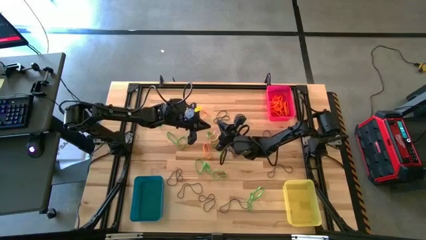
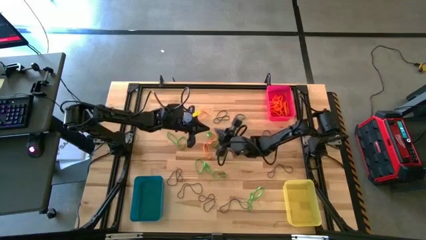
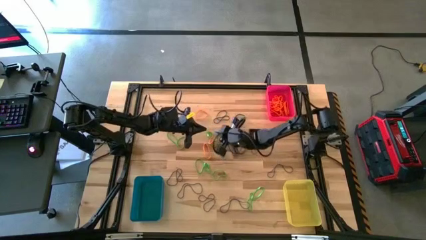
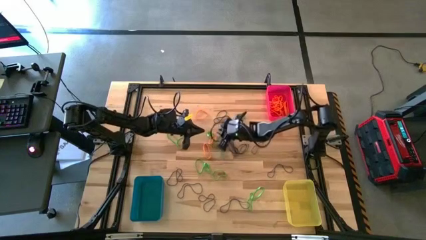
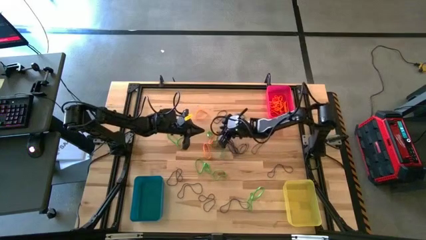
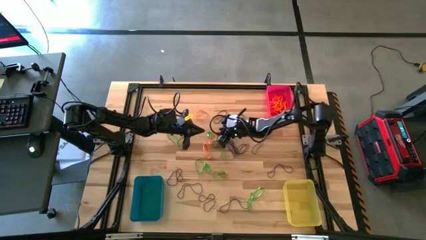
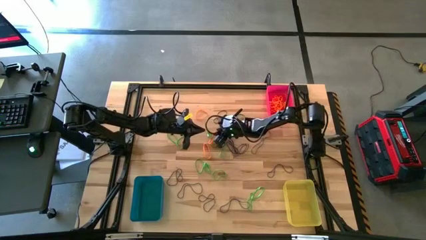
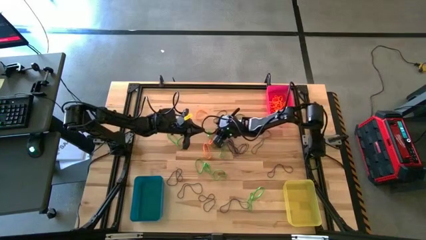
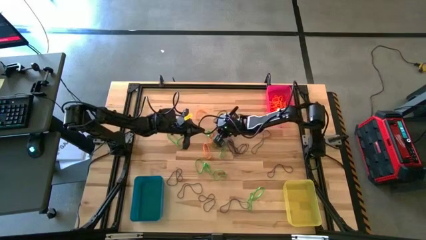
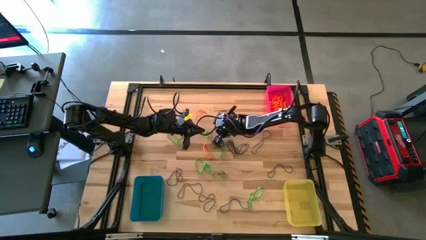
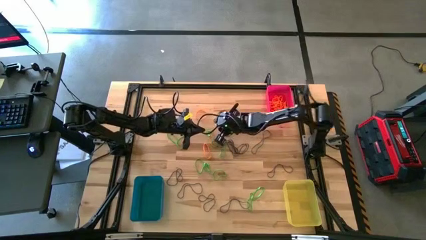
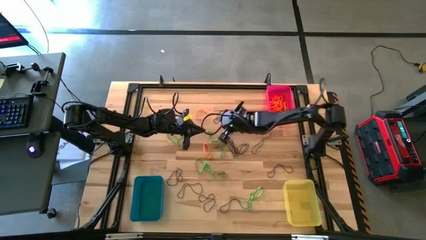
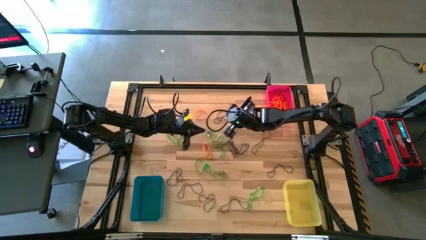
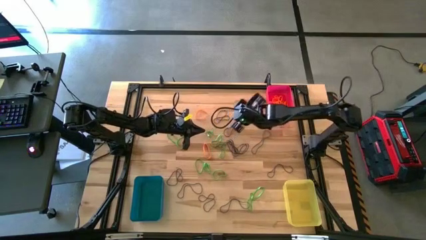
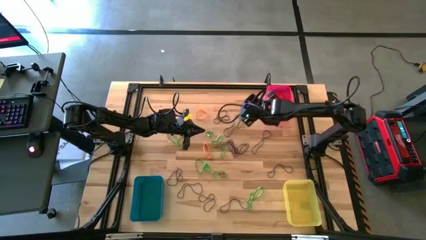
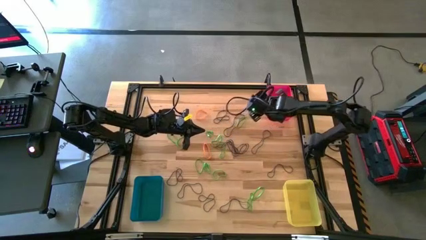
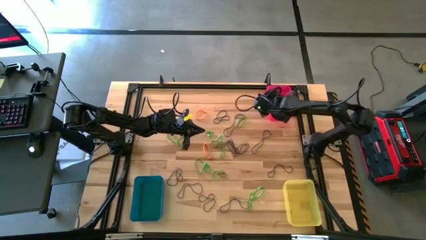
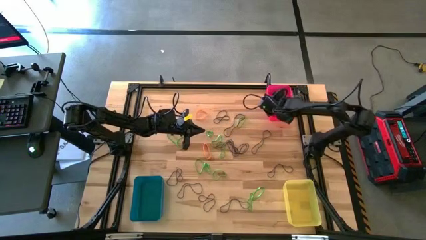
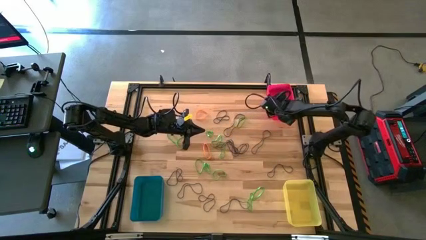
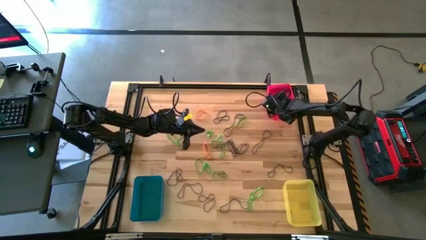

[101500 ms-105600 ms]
Task: Sort rubber bands into baskets
Put the orange rubber band into the red bin

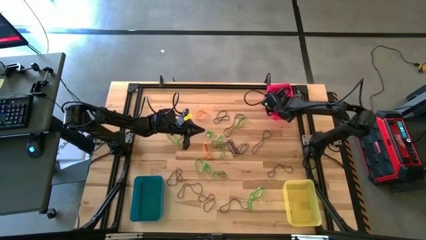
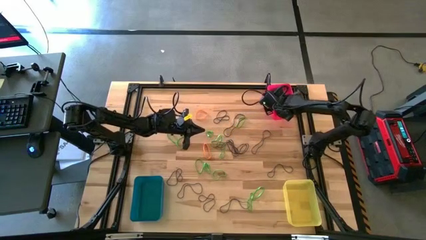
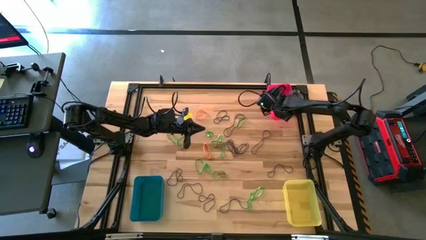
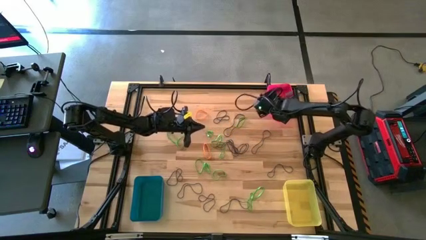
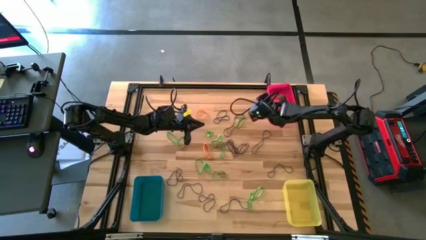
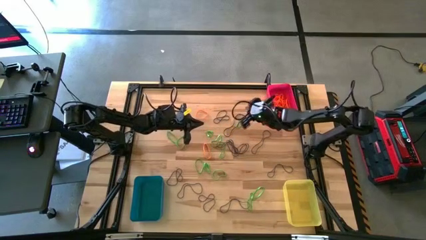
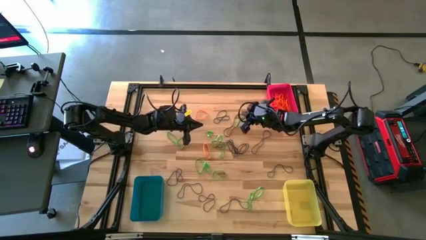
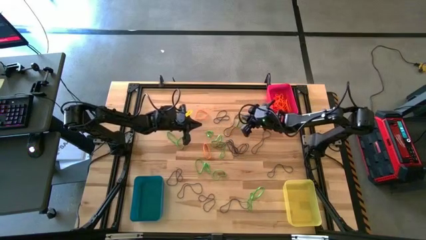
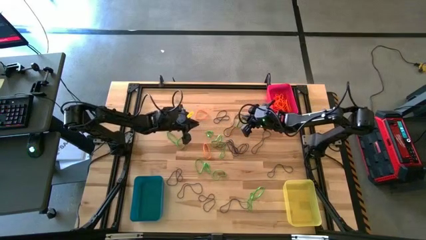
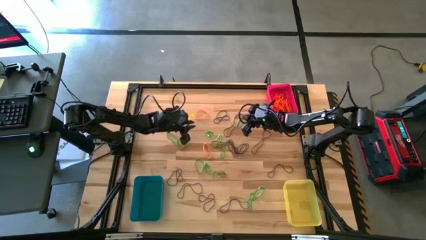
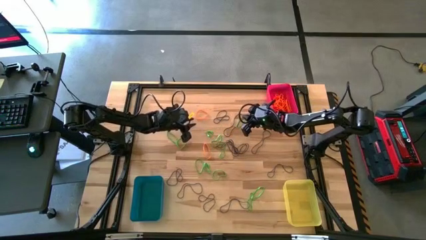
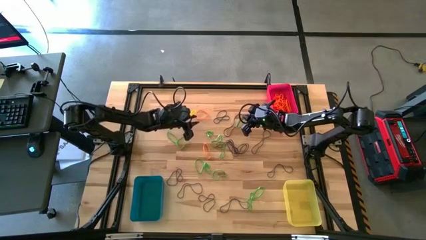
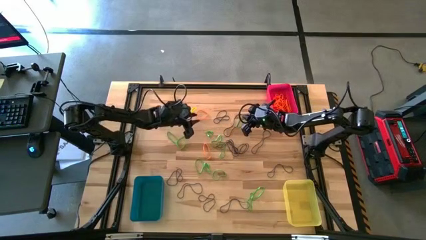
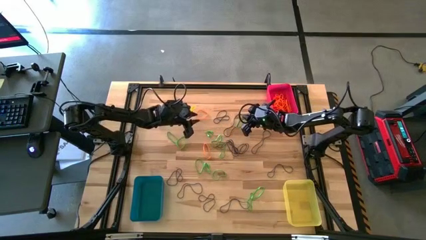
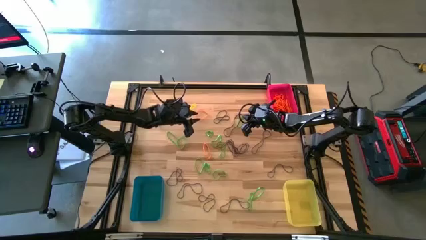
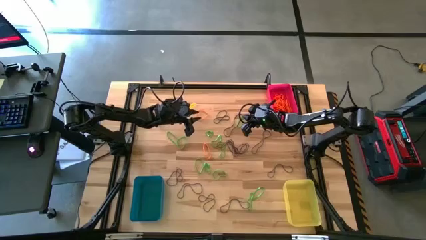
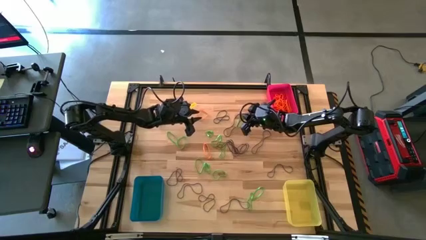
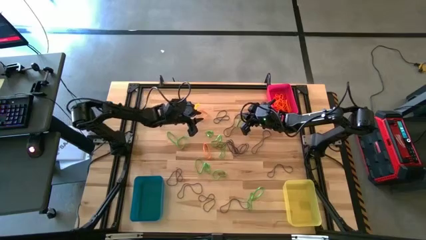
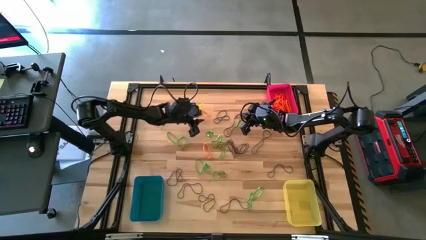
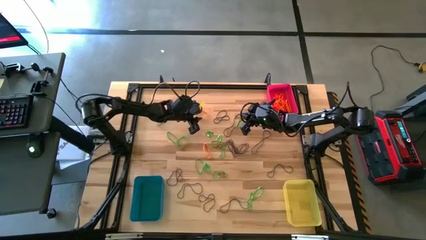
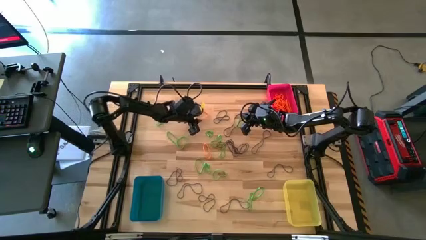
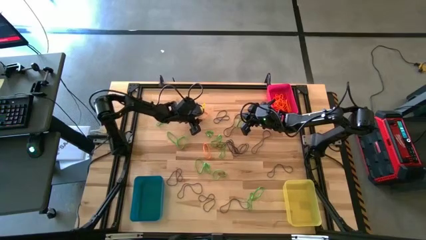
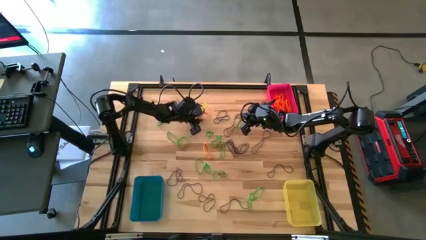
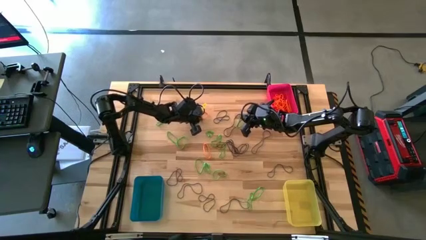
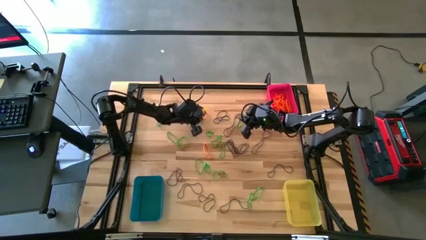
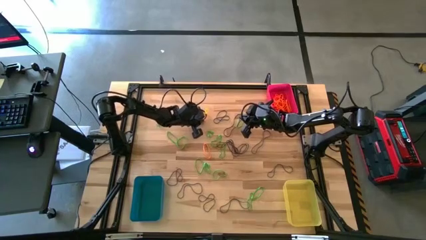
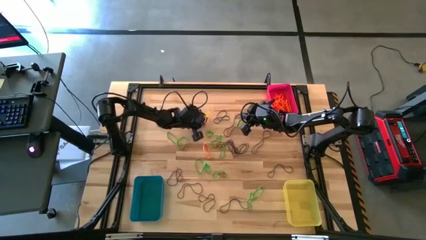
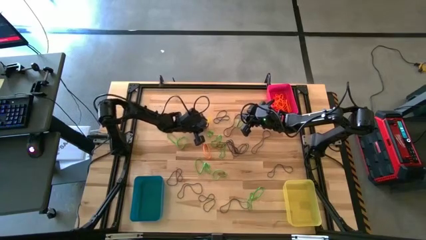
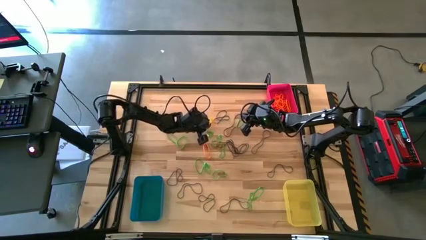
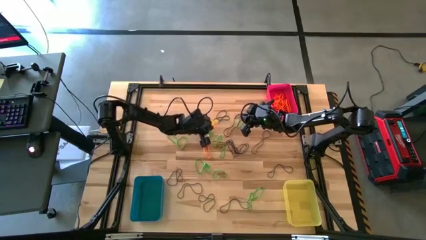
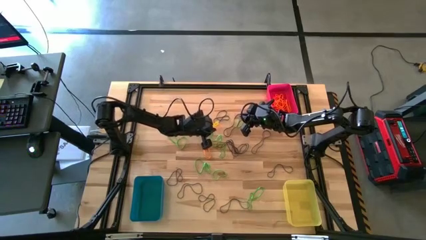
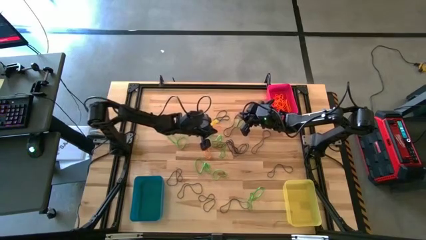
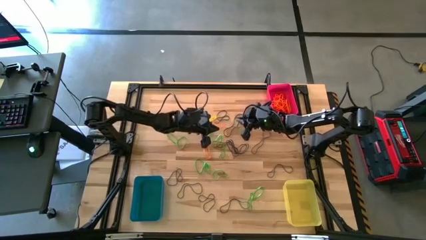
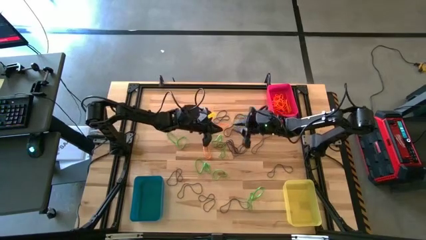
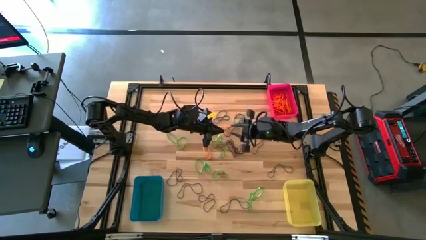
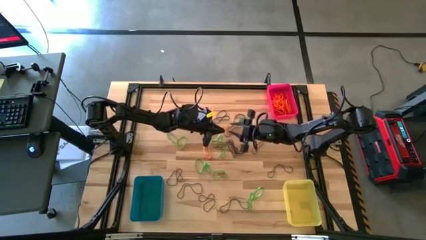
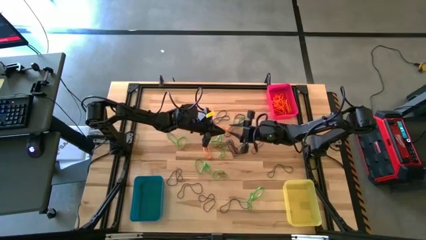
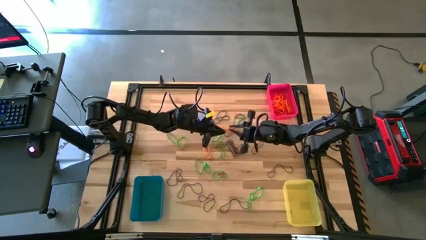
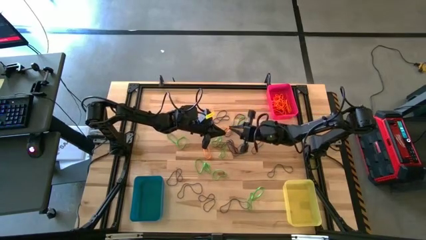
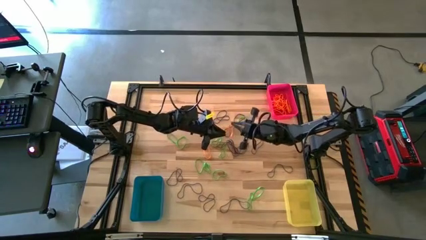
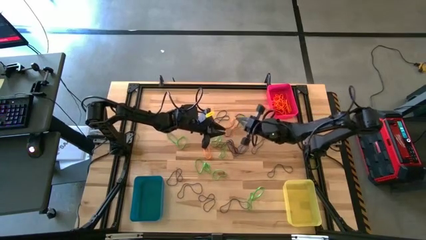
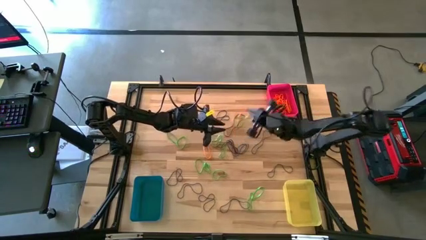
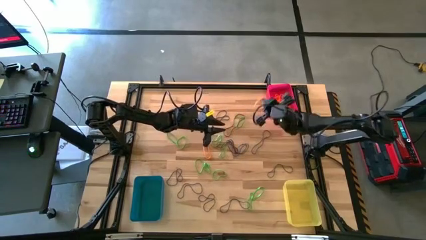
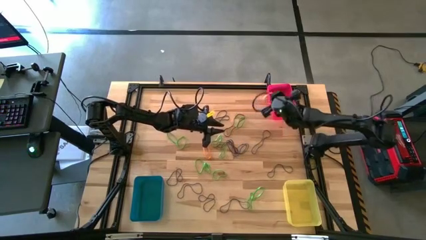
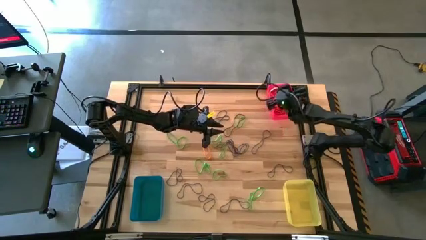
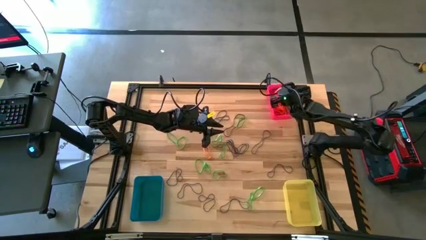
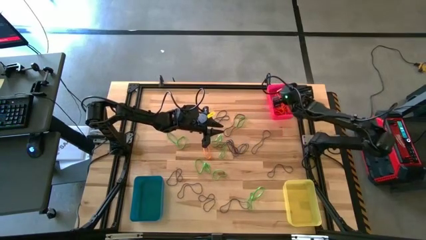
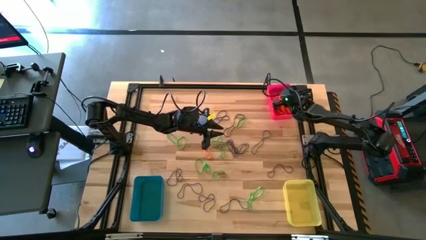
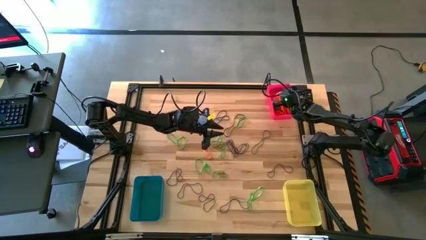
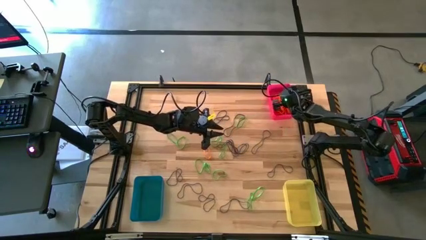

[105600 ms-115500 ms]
Put the orange rubber band into the red bin

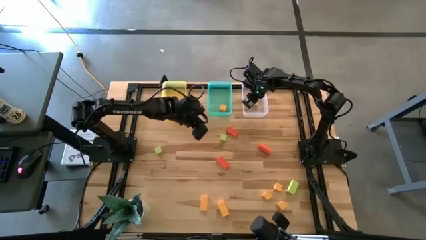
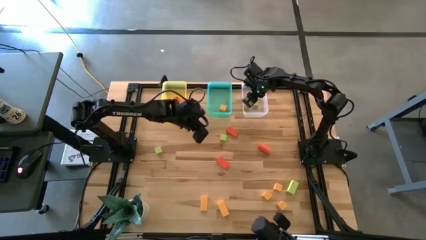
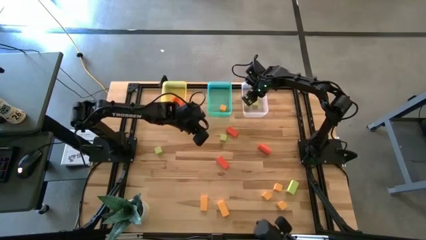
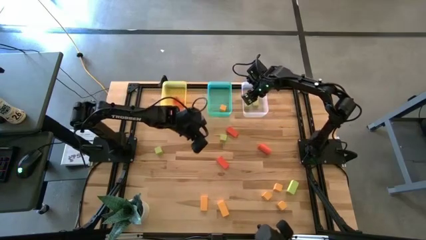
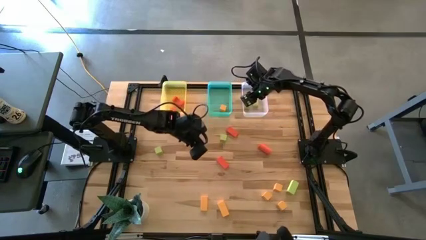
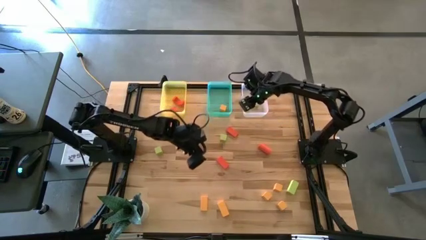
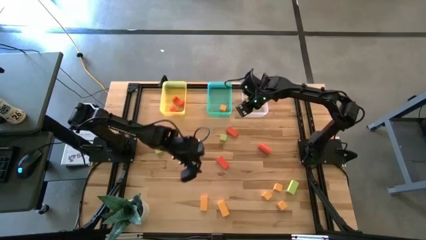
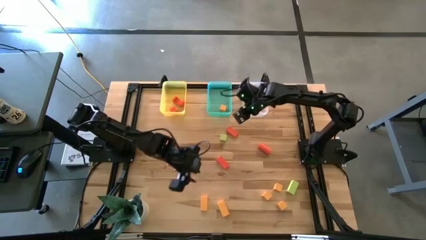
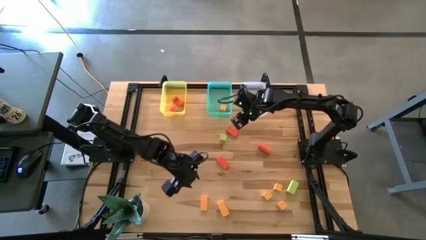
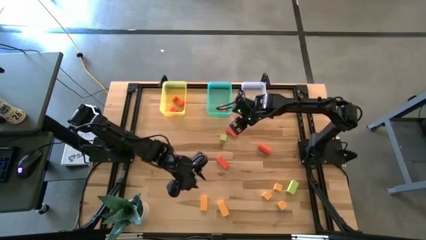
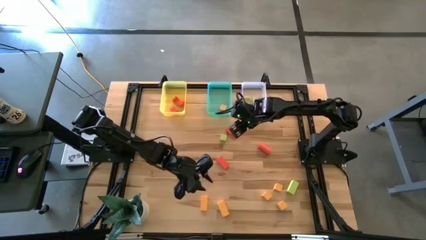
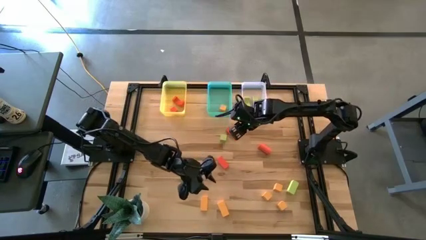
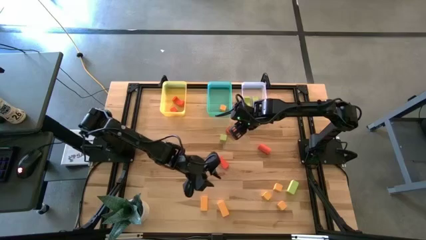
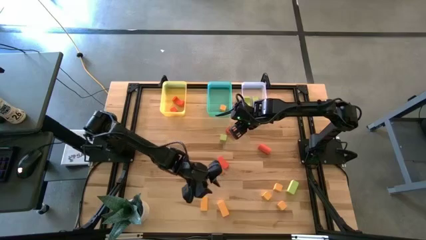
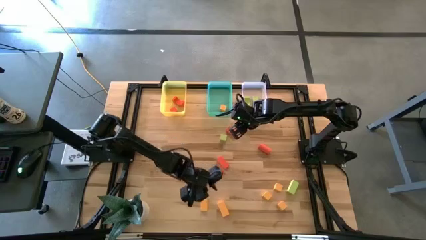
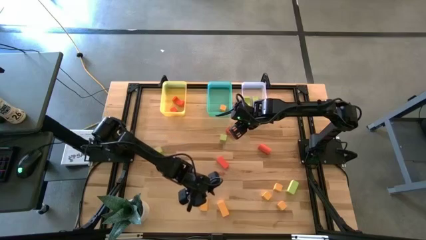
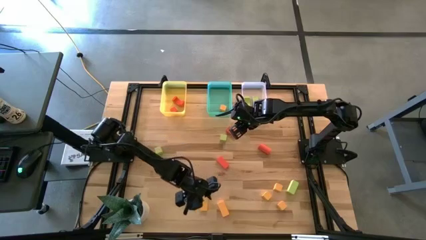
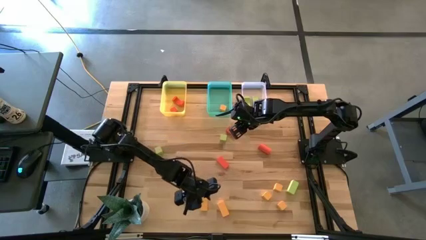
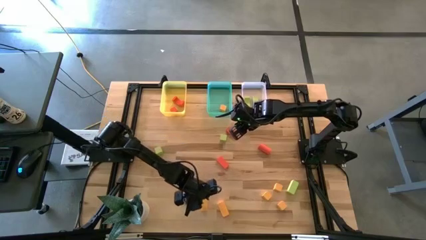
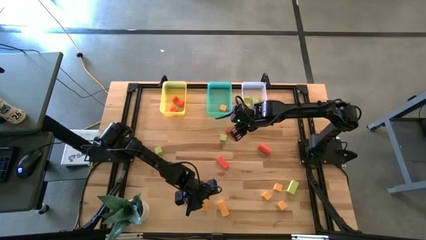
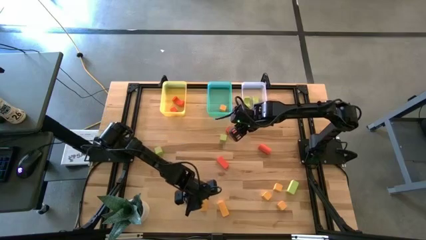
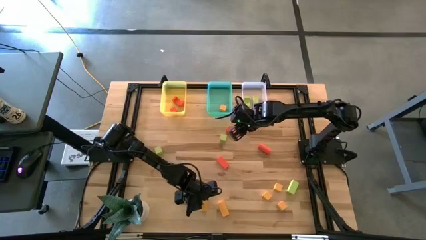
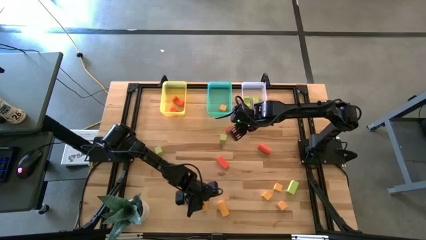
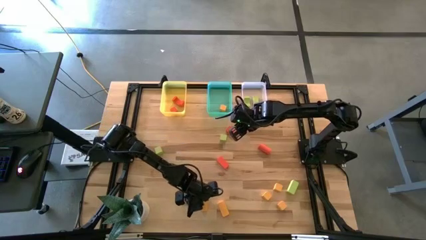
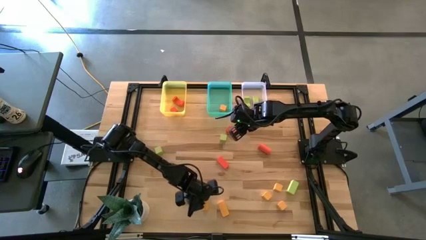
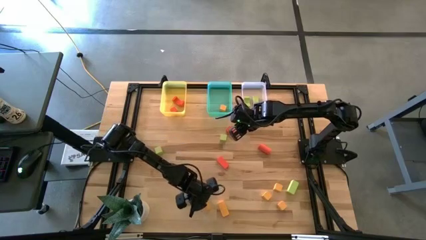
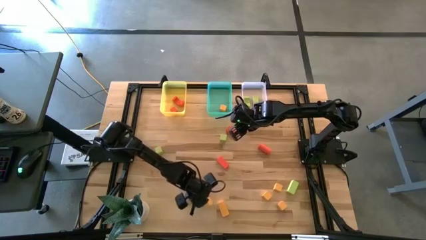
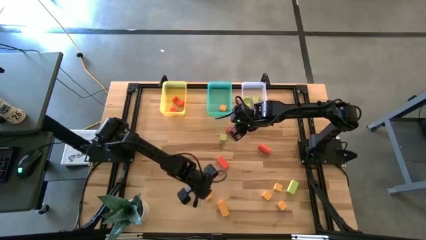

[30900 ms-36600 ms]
Task: Sort & place blocks by color
Put the yellow block into the green bin
